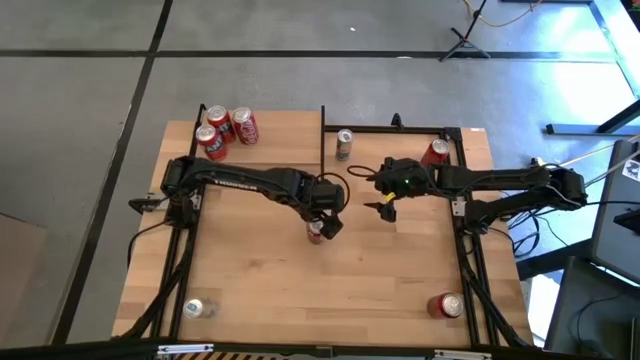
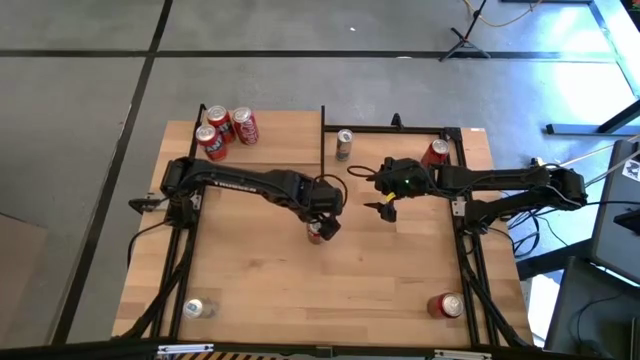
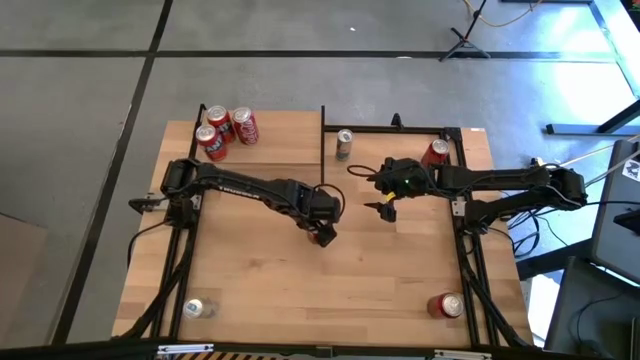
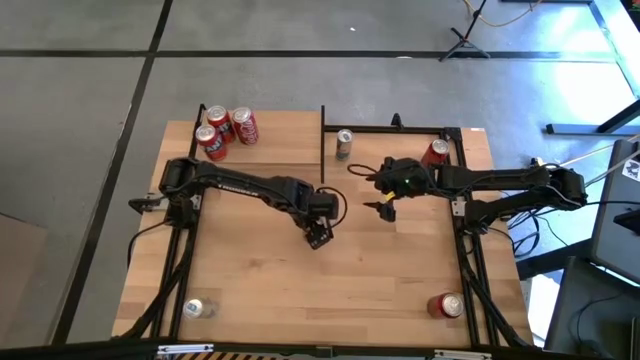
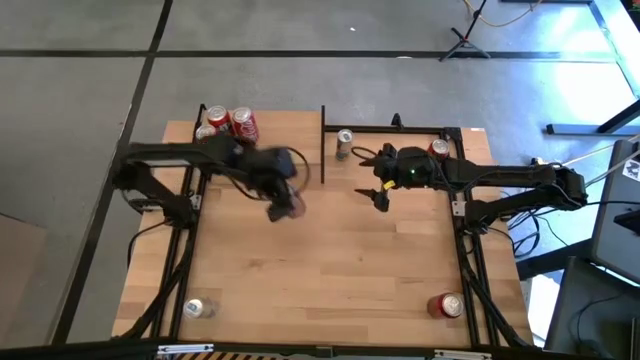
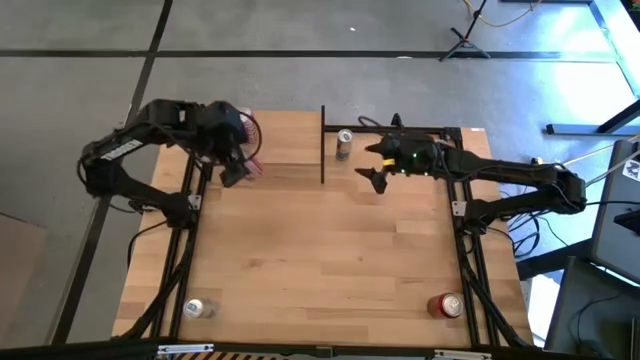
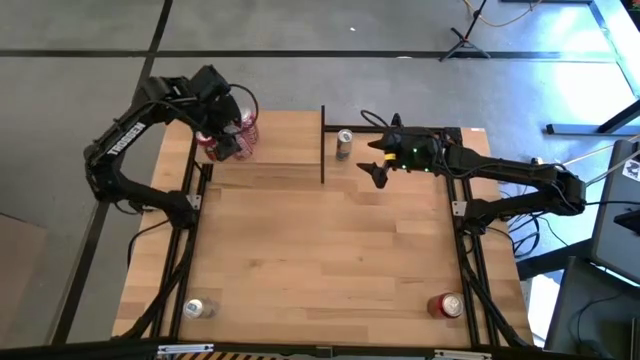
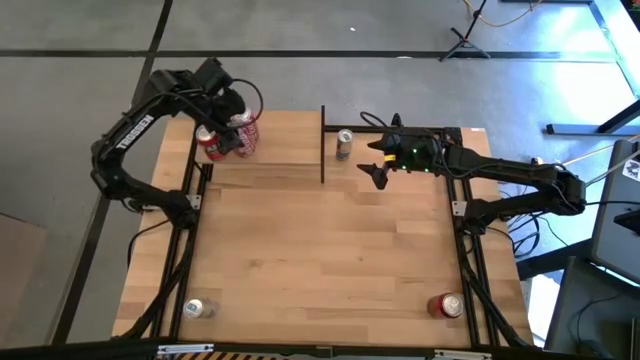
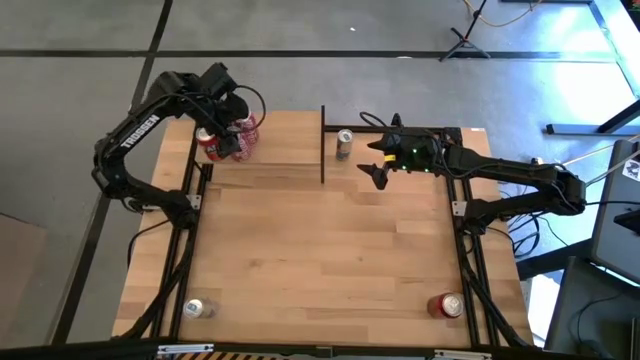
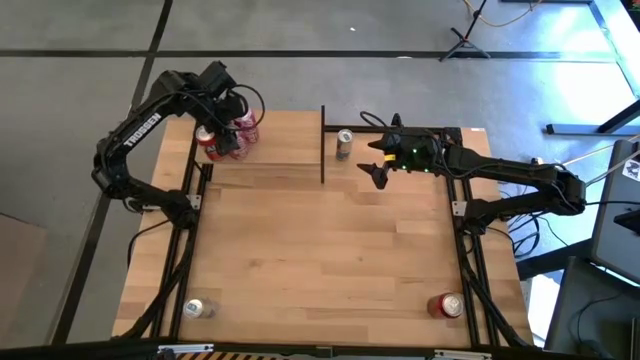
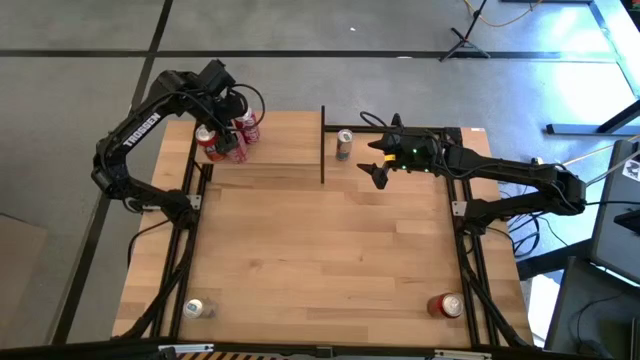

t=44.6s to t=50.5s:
Task: Place canned beverage on shelf
Put the red-white soda can on the shelf aligned with the other red-white soda can

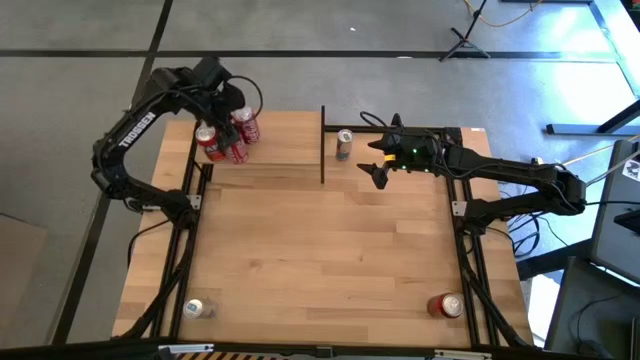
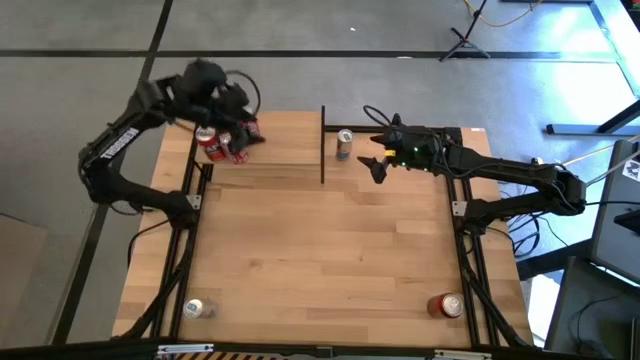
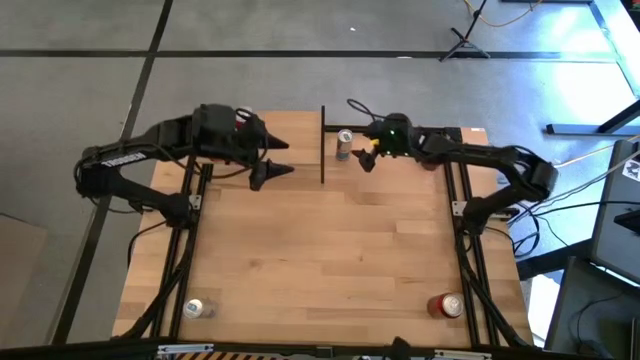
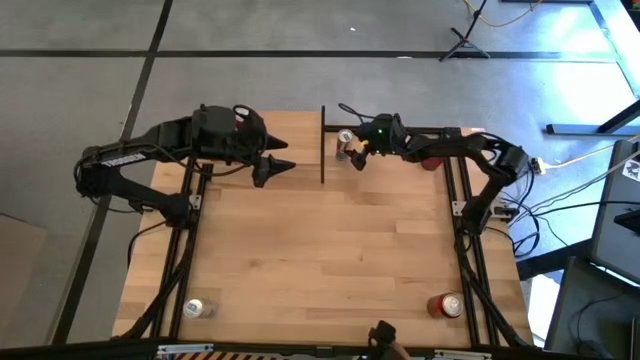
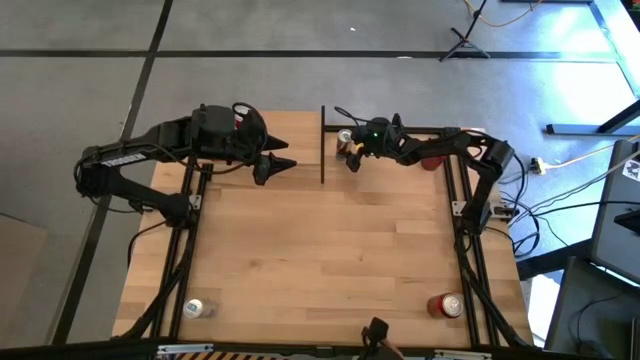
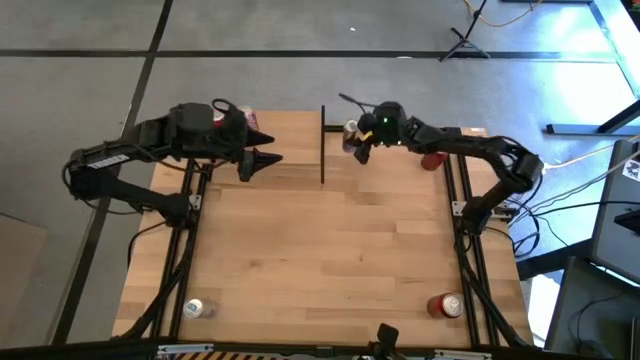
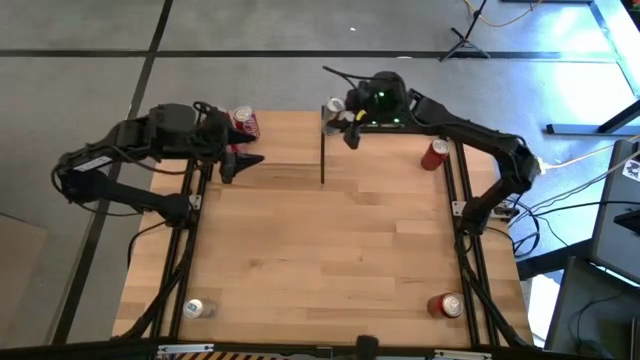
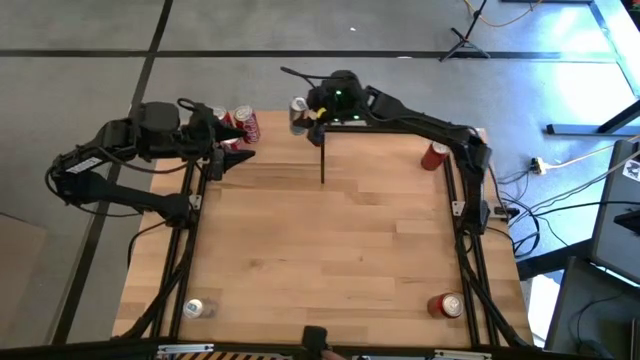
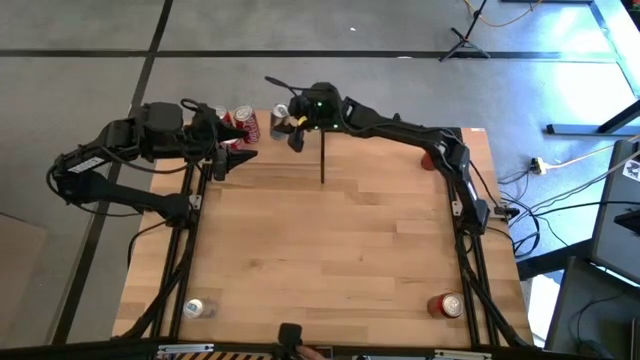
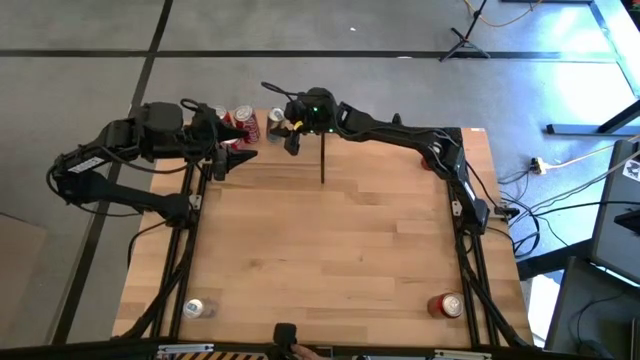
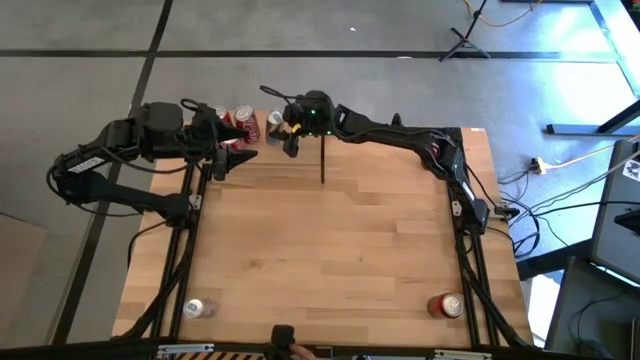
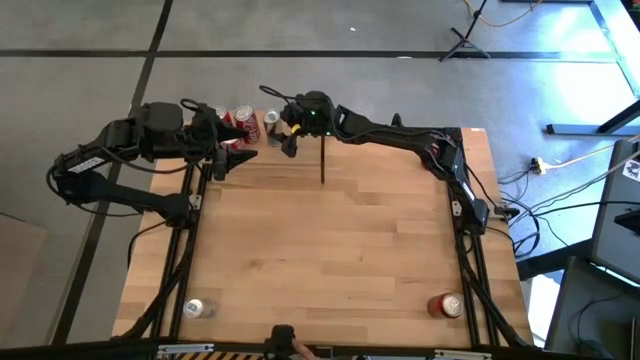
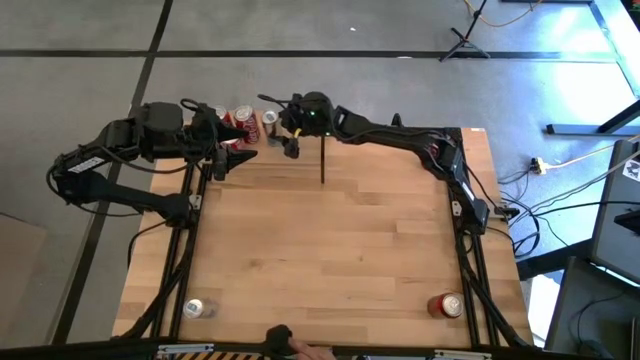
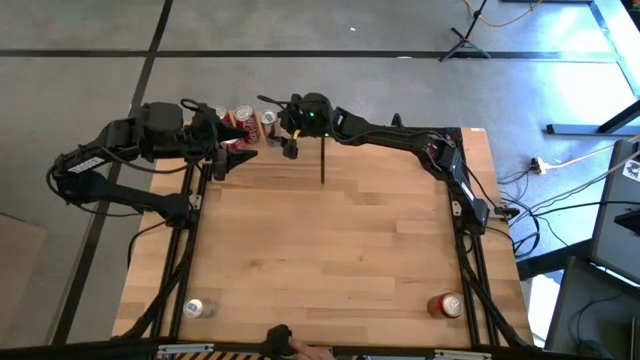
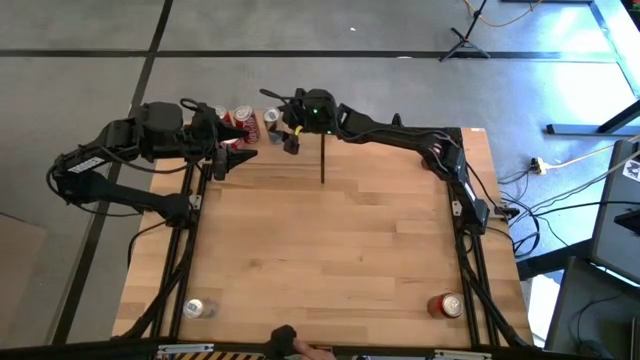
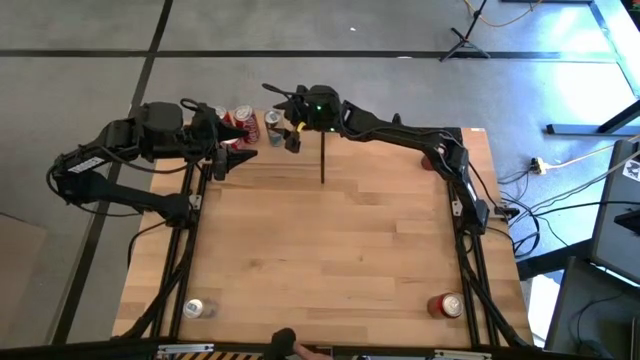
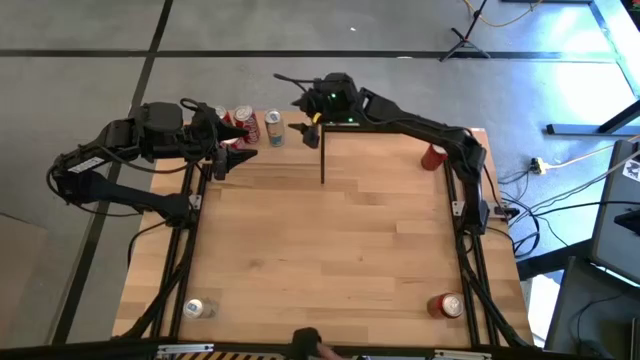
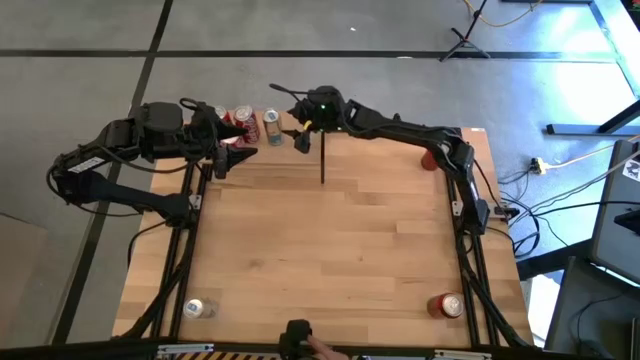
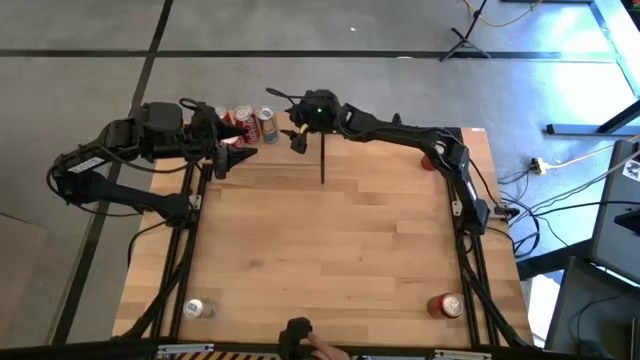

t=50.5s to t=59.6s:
Put the top blue soda can on the shelf

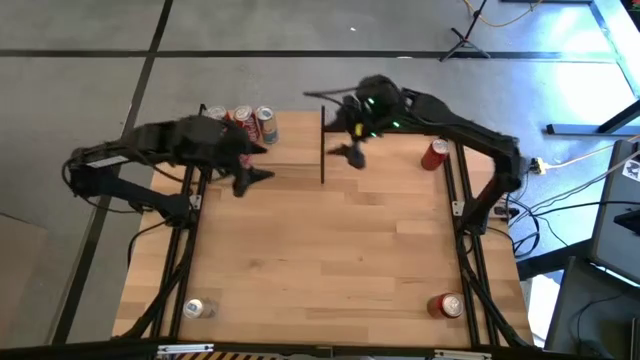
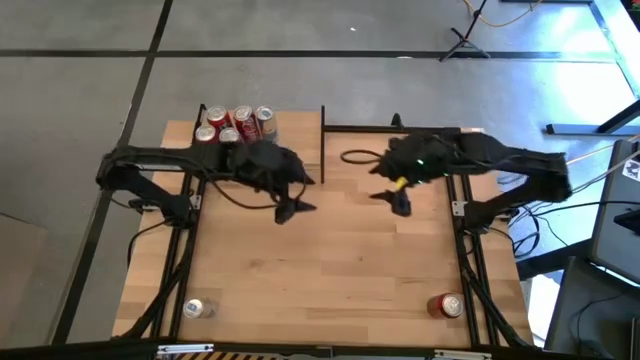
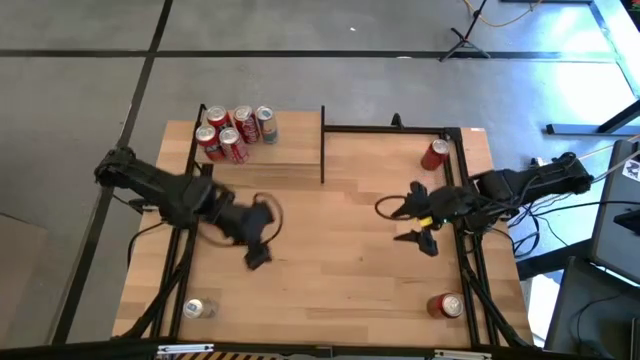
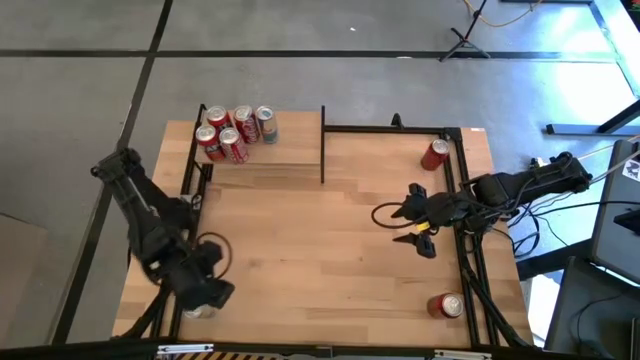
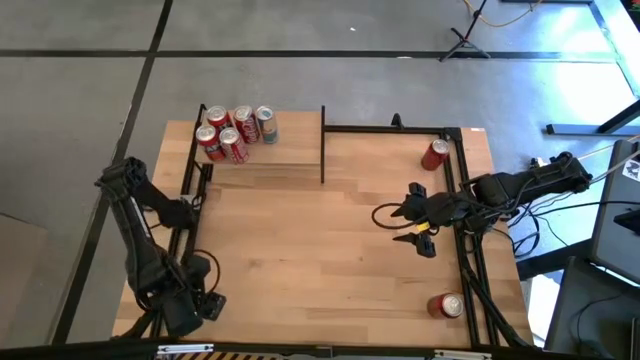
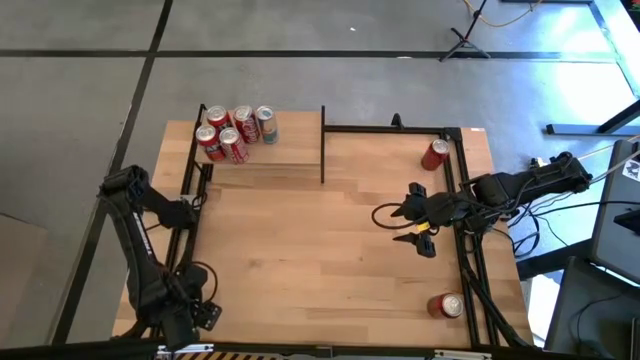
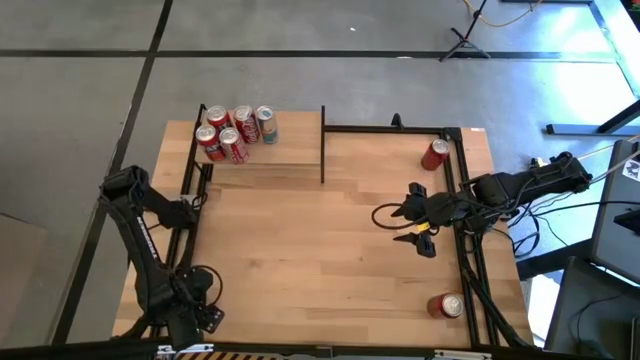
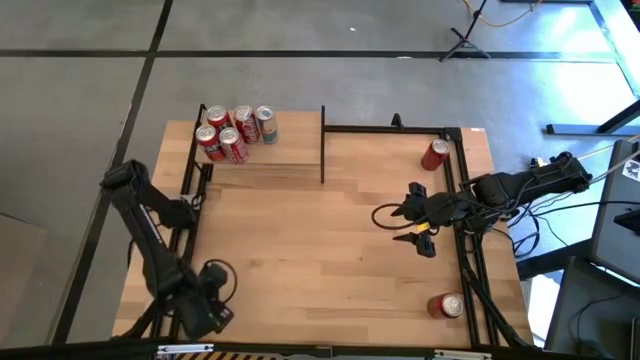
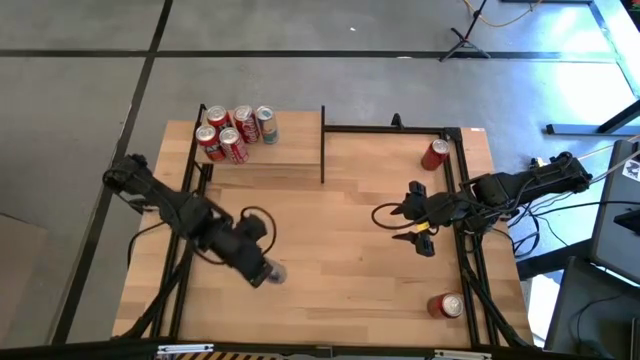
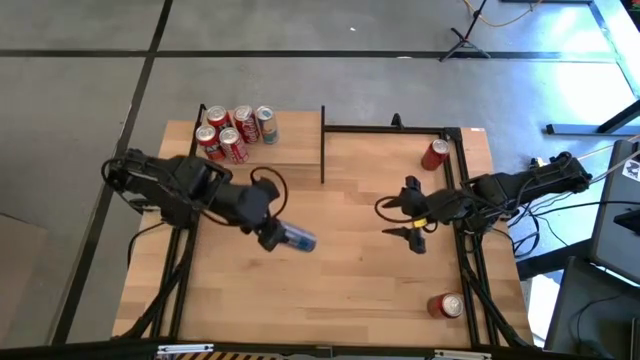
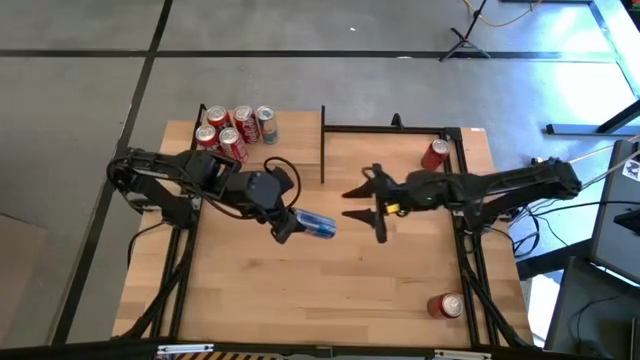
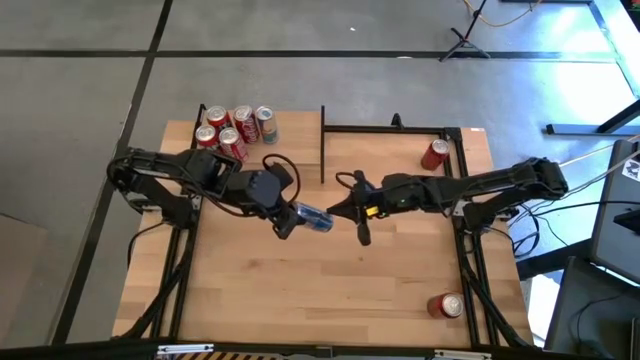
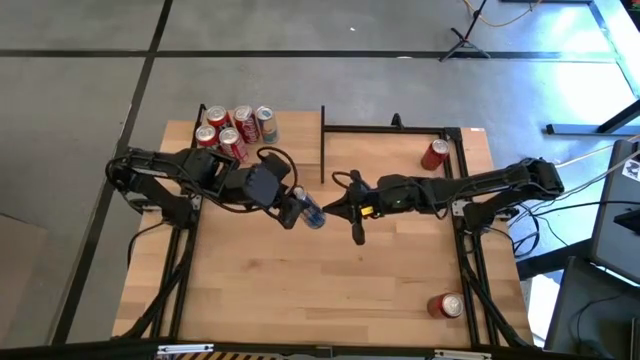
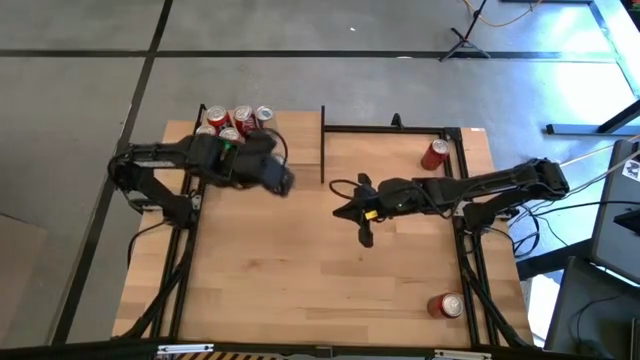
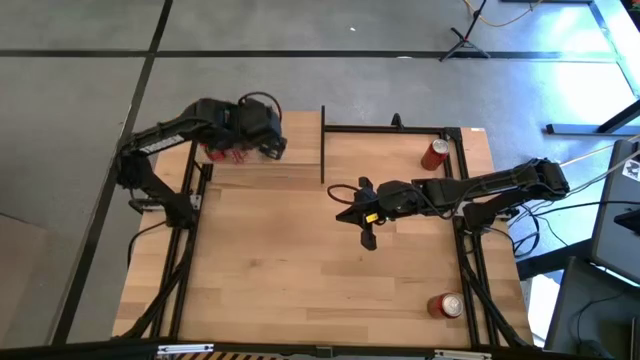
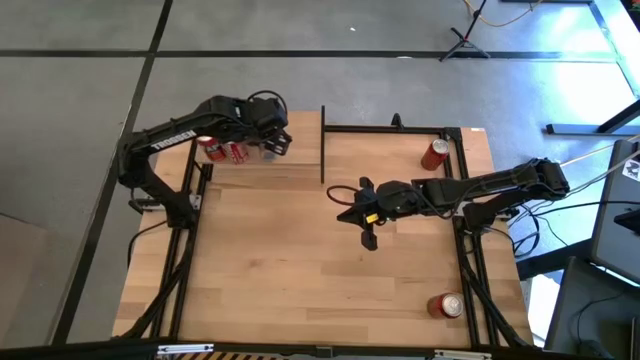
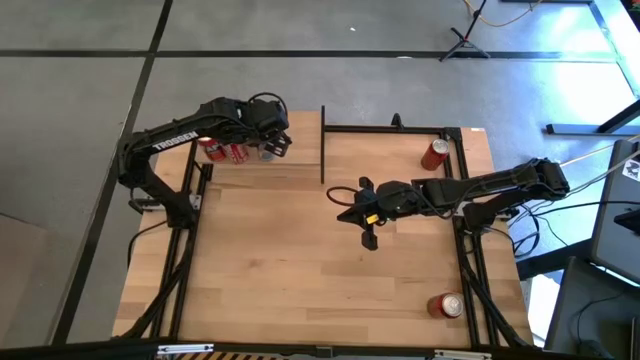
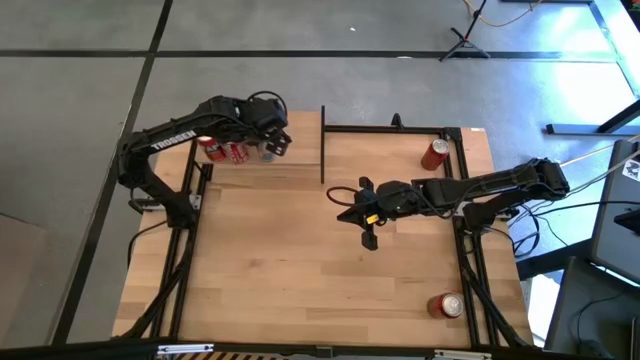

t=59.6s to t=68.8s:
Put the blue soda can on the shelf aligned with the other blue soda can
